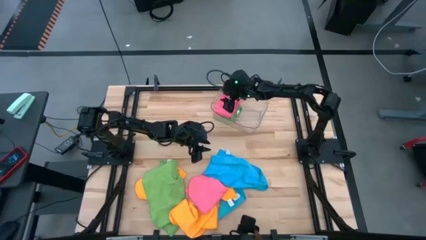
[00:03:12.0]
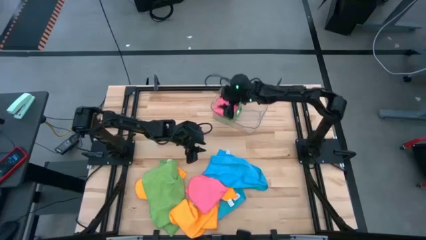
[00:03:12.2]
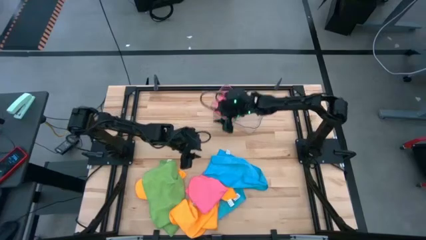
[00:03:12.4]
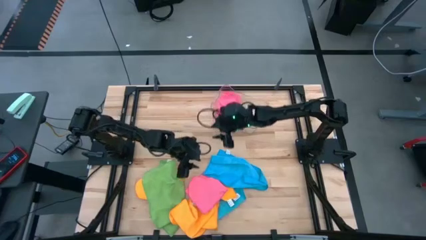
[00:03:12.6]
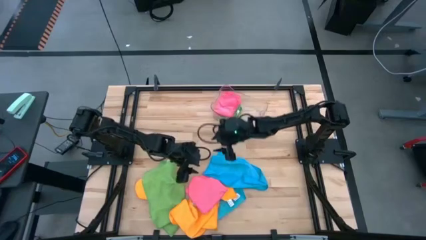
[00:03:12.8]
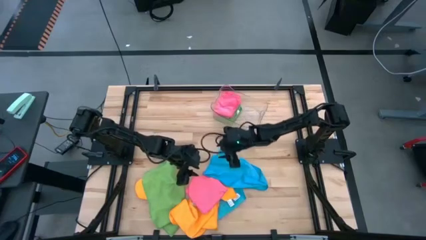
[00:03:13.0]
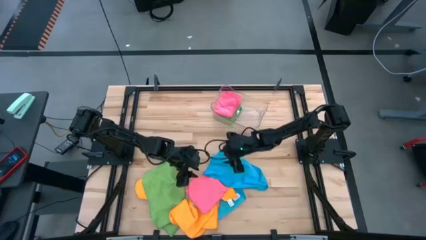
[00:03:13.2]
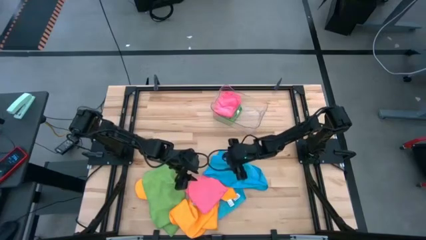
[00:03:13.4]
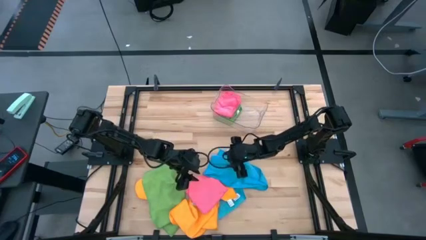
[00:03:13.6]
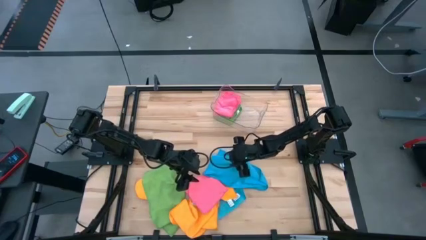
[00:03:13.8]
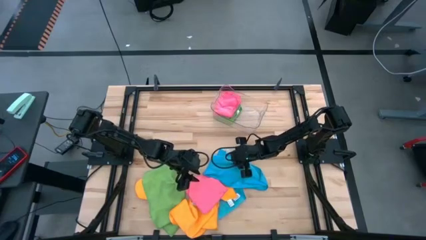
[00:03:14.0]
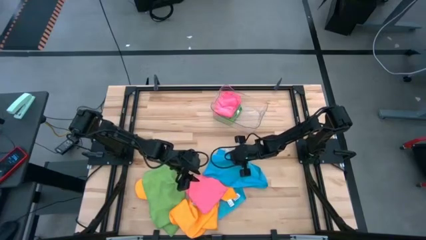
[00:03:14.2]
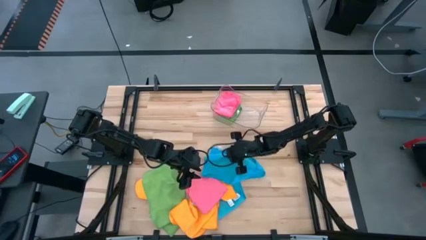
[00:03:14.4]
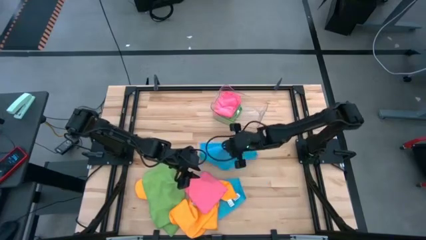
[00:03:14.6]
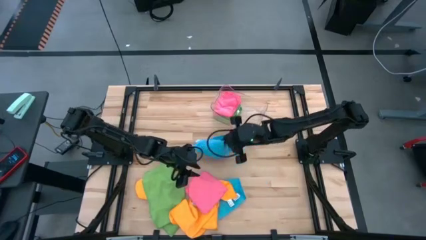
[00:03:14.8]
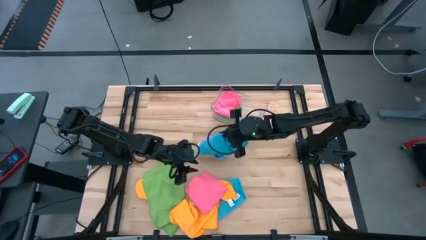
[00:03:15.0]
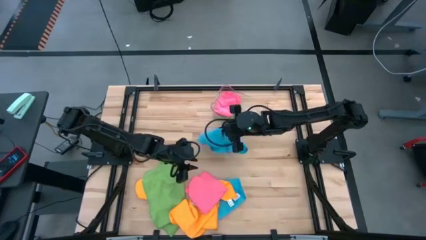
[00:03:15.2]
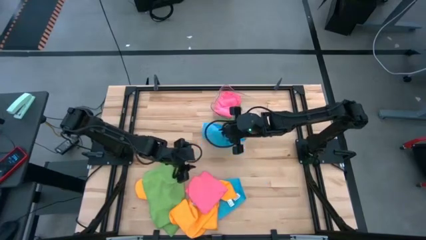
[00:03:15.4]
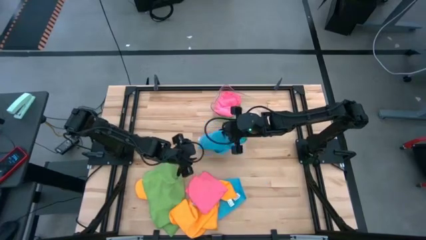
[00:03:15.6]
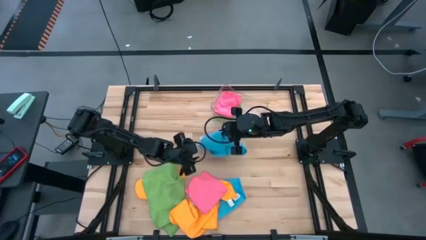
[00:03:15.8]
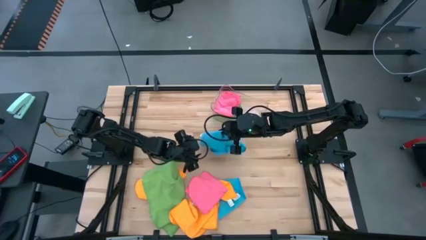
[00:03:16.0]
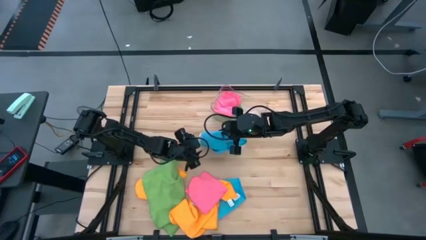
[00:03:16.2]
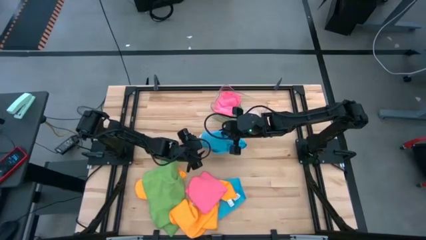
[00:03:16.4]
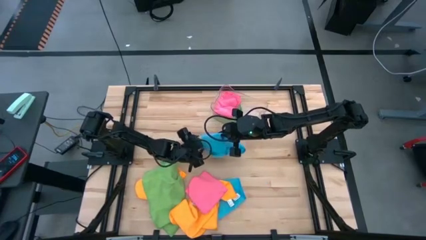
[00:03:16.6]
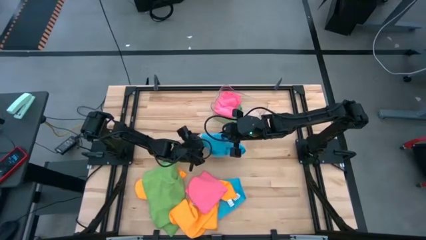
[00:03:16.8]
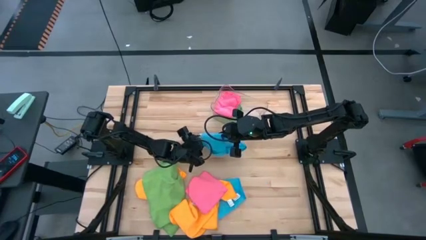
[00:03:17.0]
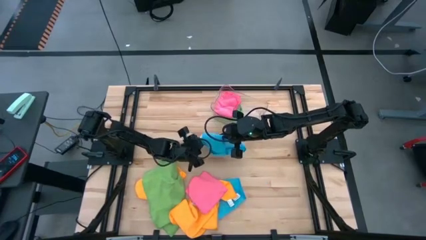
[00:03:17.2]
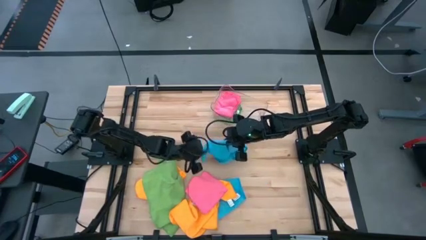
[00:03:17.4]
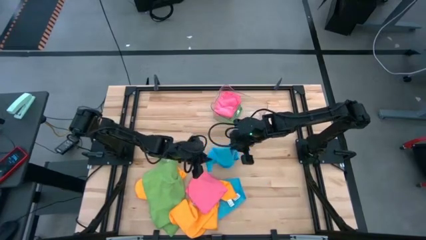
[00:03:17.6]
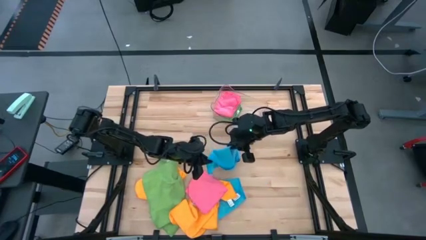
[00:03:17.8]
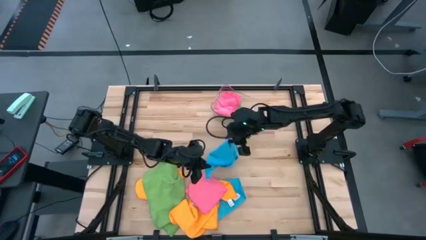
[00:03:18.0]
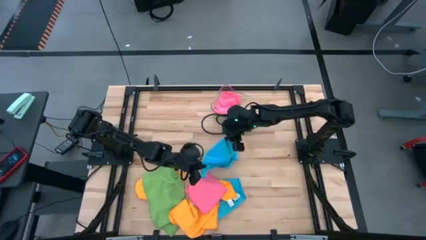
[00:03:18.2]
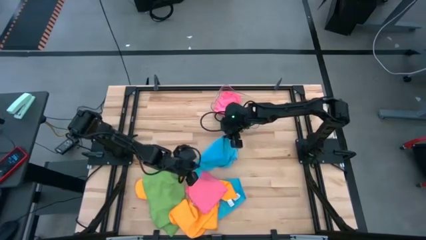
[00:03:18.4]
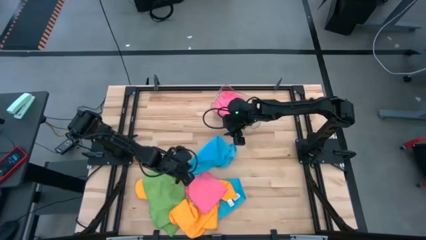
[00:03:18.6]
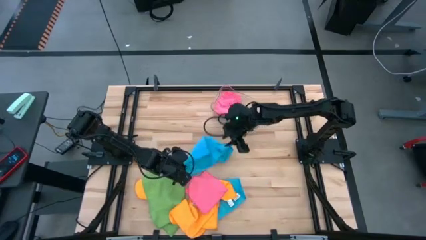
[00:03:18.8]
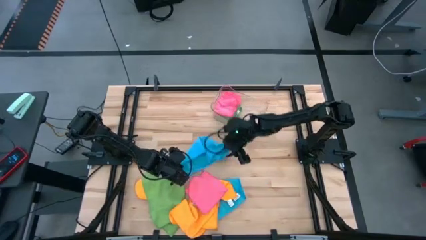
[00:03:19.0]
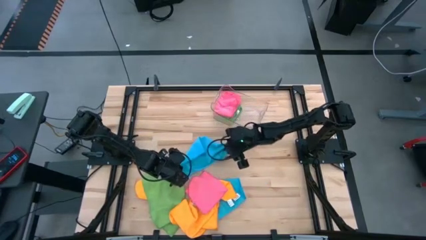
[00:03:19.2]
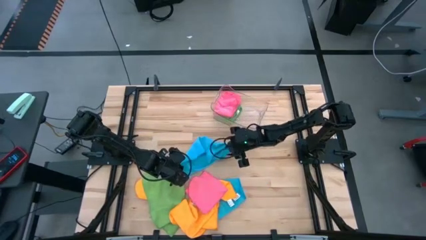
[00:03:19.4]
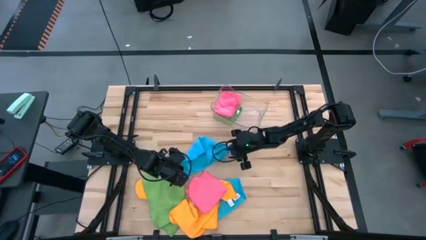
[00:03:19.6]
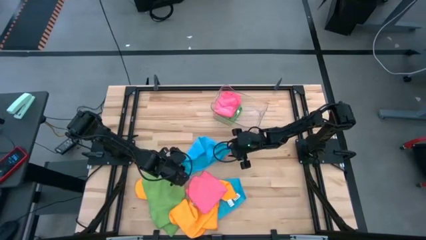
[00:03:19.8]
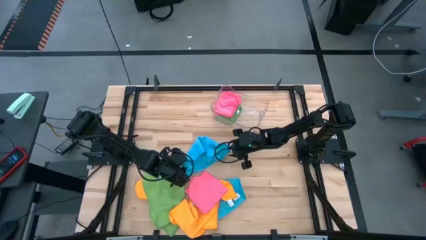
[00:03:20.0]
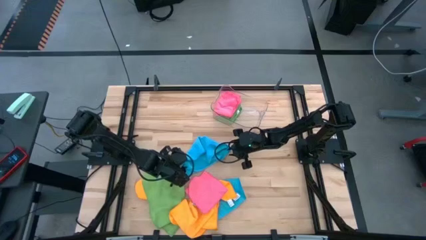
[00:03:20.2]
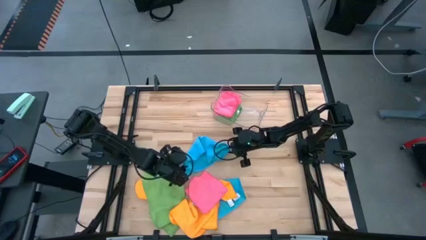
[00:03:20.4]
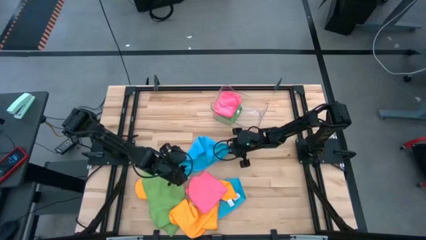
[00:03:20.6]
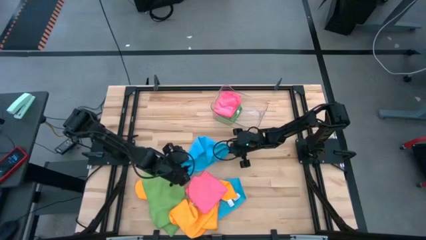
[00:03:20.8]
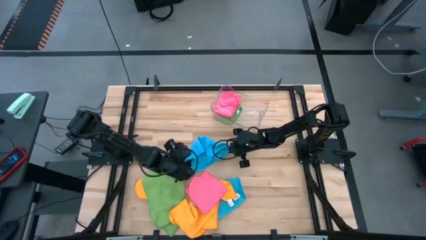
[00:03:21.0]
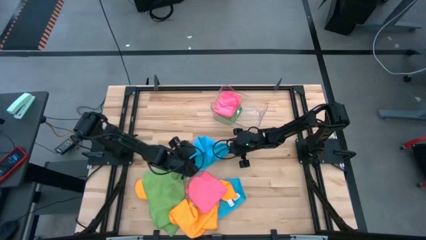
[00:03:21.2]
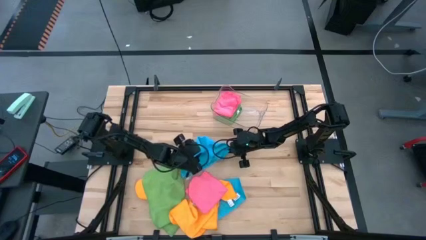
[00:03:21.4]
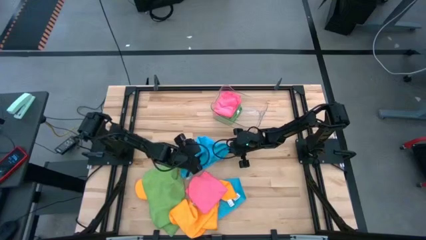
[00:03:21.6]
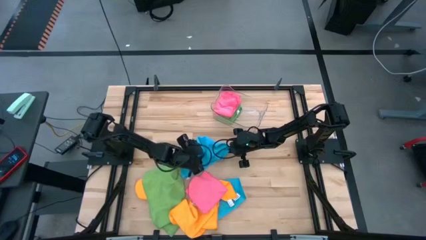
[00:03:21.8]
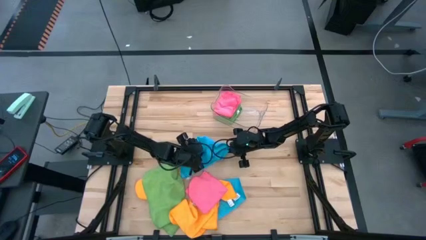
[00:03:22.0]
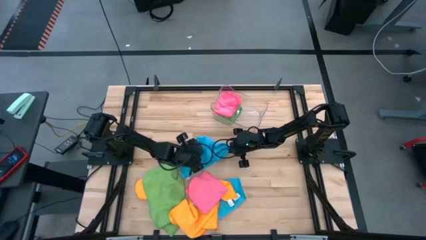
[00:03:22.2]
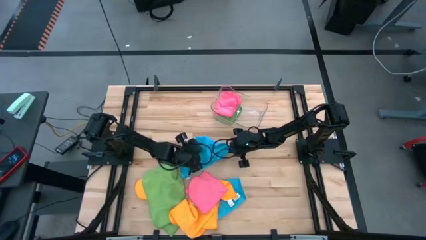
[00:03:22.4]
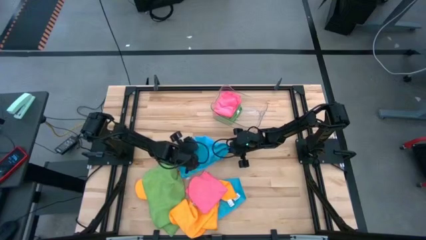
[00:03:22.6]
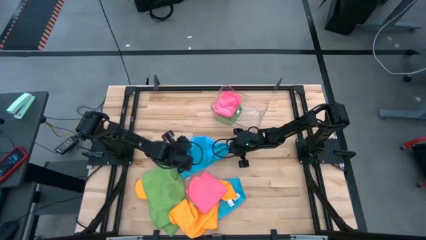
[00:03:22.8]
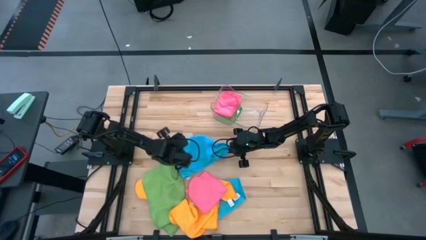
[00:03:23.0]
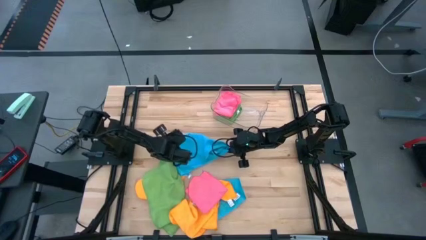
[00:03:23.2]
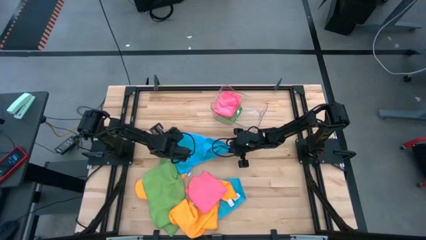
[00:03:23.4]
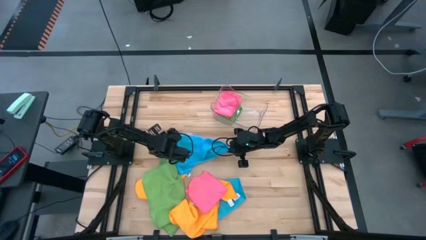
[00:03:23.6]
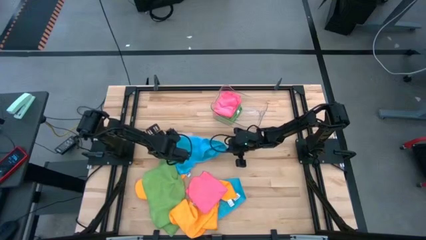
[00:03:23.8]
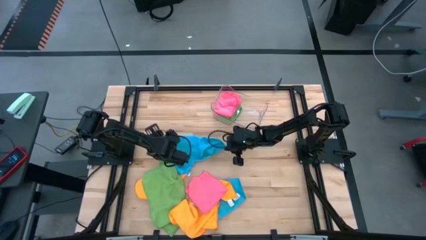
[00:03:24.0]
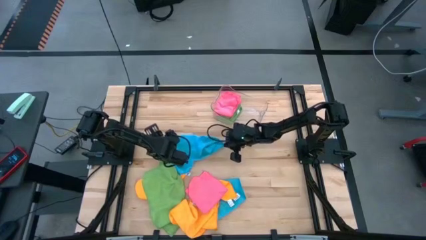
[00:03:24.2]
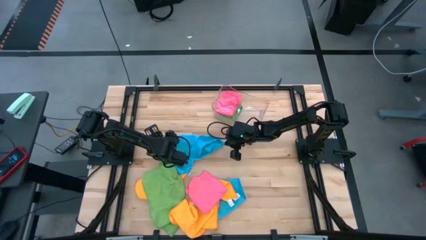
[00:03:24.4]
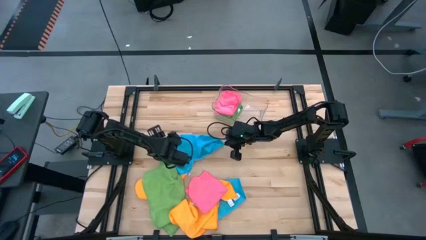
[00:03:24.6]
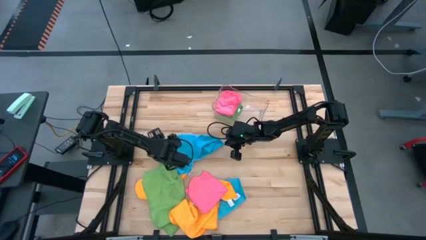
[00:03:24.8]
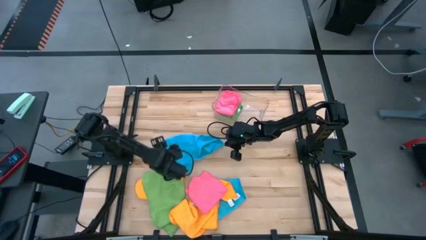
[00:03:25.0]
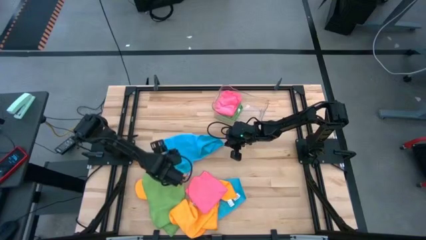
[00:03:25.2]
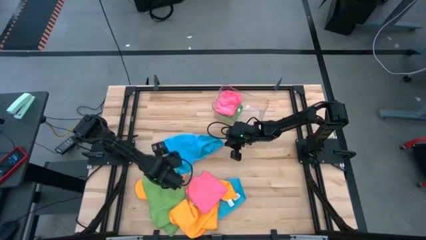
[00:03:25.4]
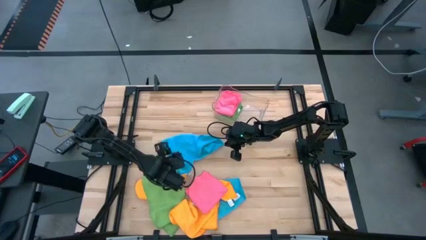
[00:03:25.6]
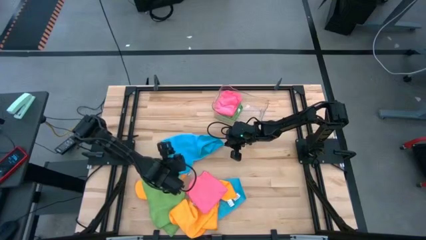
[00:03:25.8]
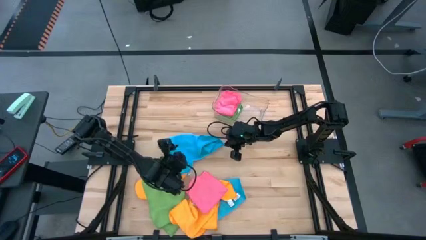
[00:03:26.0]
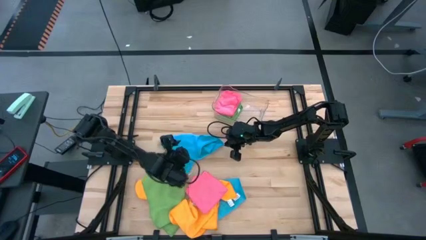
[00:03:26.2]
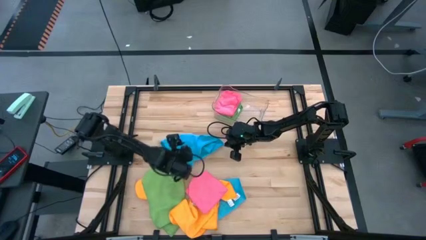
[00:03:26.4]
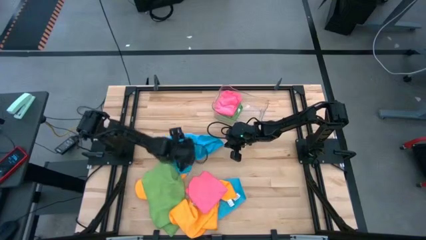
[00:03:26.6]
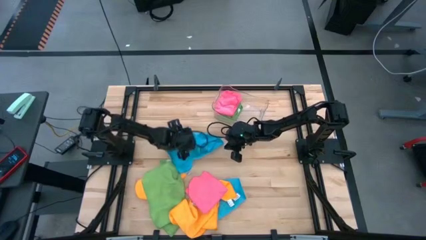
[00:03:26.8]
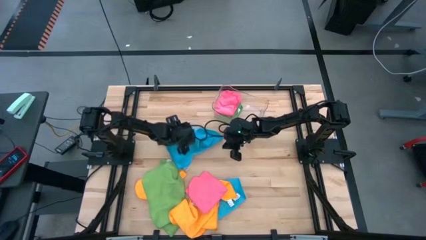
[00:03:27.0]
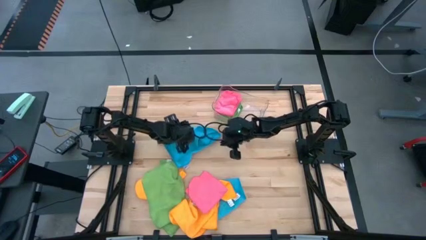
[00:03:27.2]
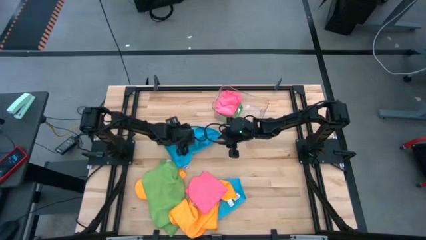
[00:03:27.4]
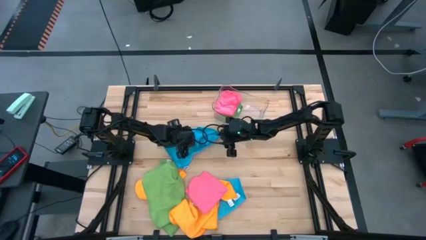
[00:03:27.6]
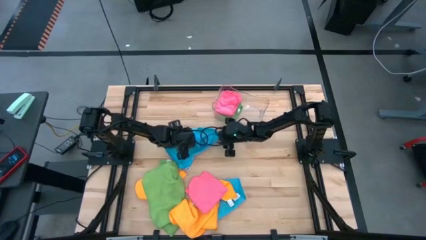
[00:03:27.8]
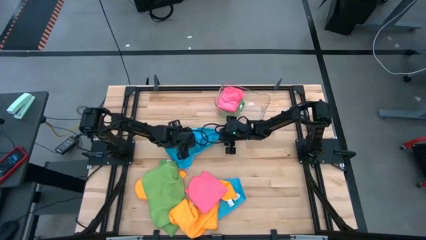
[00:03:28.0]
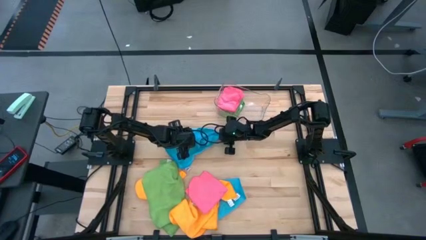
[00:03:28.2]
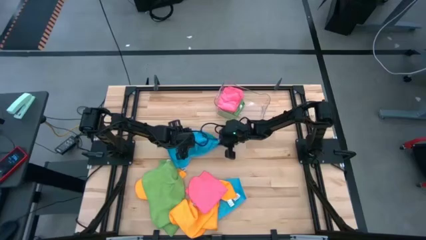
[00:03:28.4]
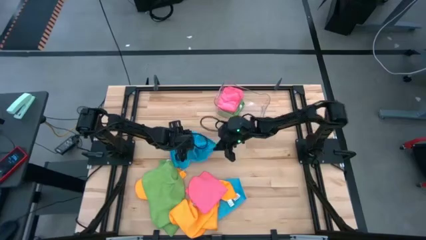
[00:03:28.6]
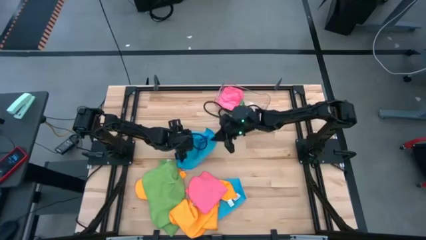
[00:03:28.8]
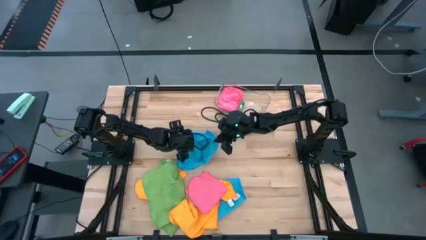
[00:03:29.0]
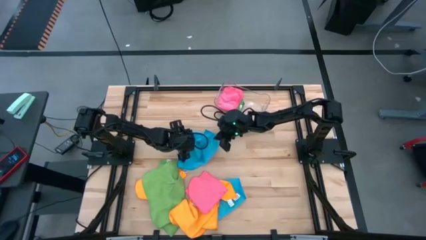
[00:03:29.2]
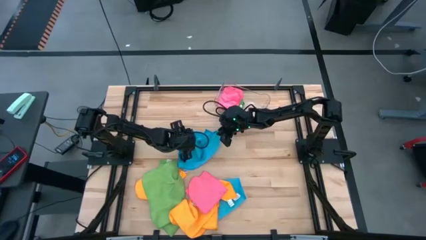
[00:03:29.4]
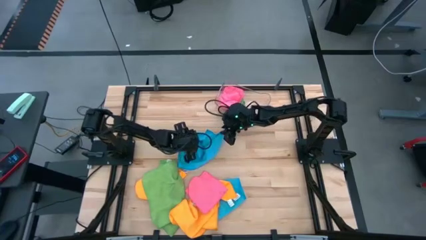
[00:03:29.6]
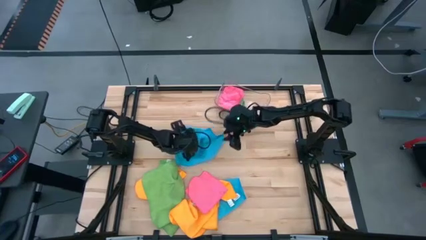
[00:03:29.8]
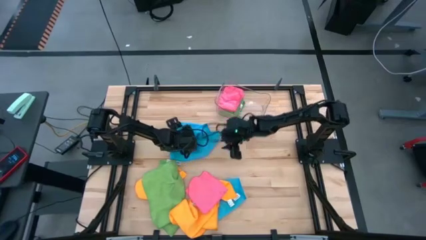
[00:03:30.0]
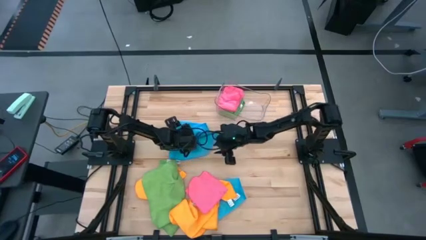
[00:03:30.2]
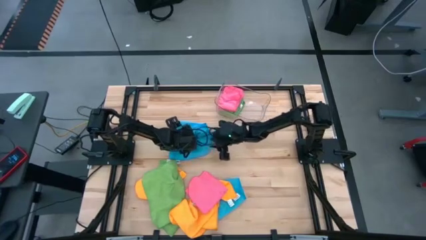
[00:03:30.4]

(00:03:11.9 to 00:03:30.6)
Task: Fold microfiber towels
Fold the top blue towel
